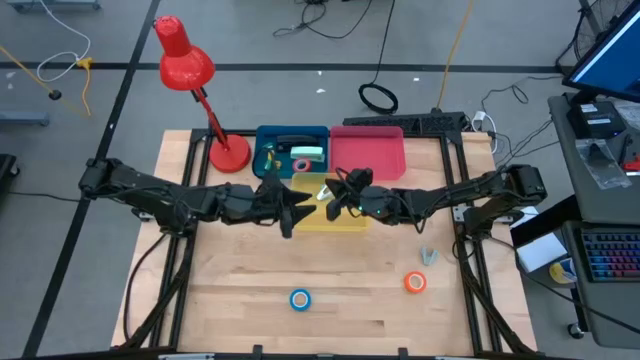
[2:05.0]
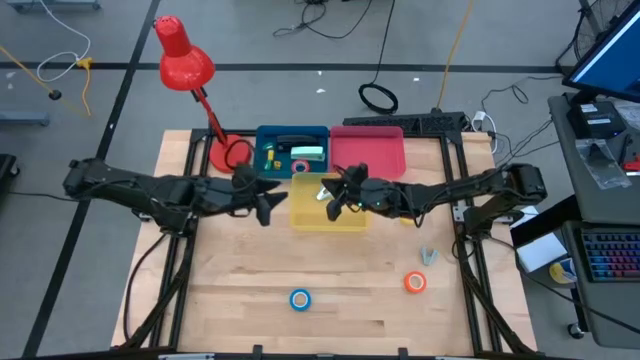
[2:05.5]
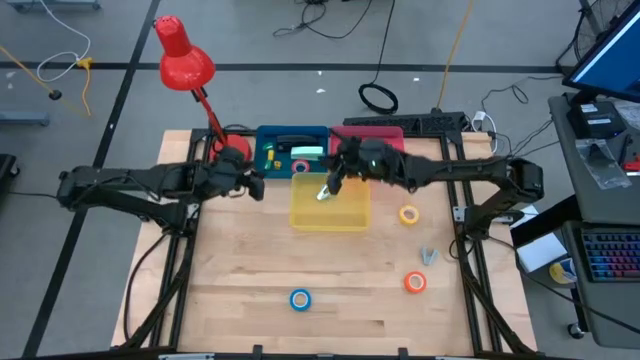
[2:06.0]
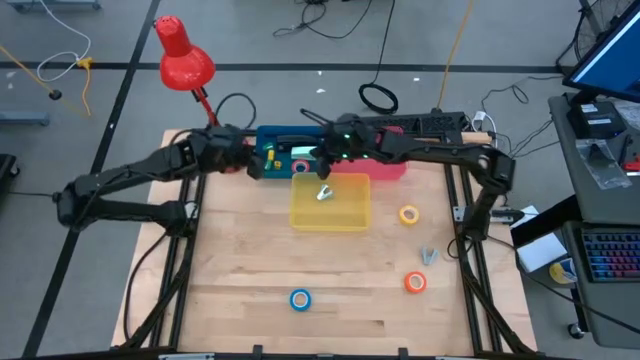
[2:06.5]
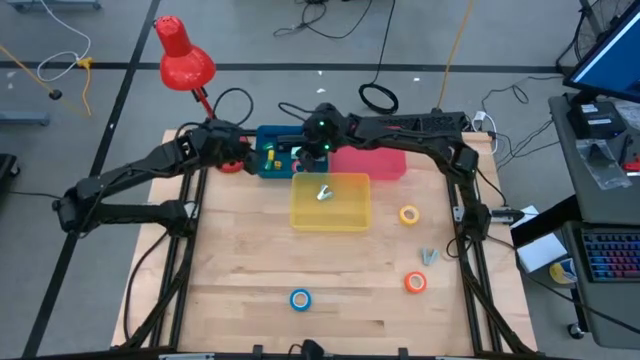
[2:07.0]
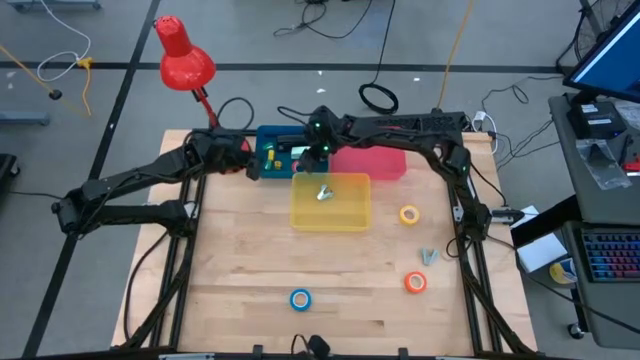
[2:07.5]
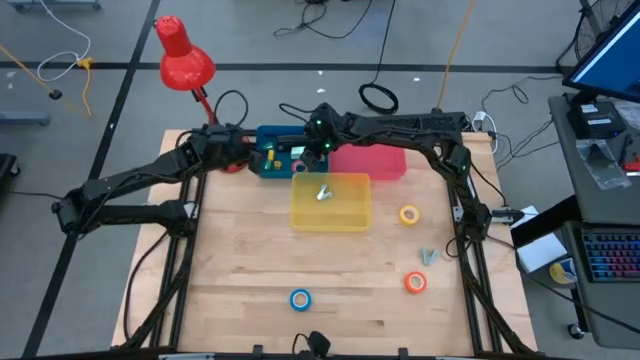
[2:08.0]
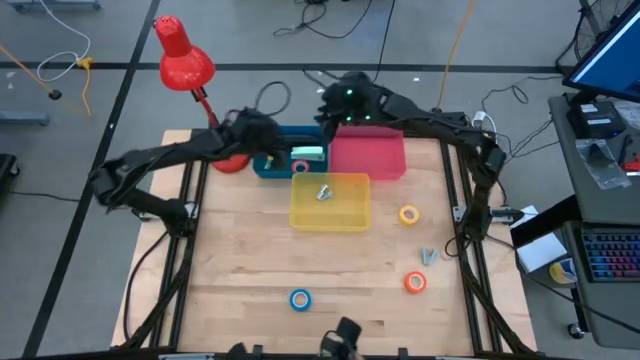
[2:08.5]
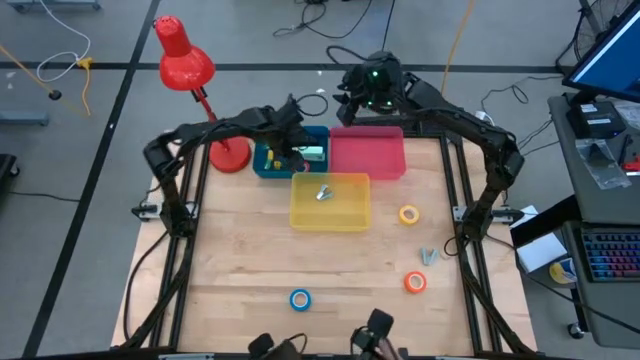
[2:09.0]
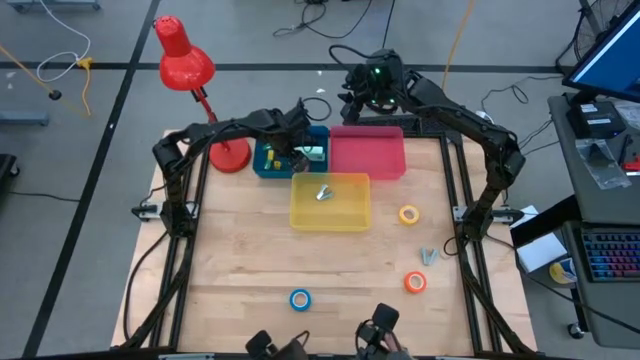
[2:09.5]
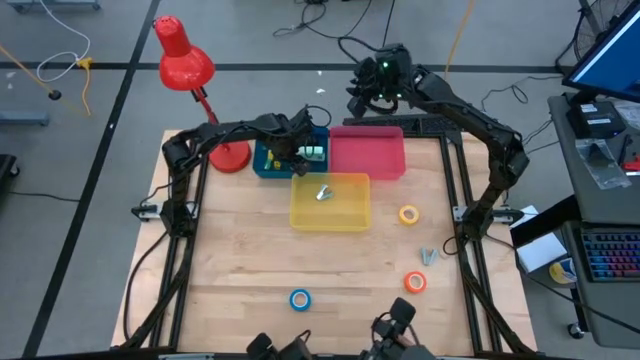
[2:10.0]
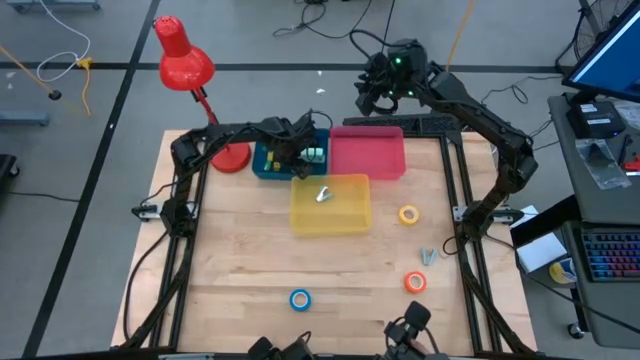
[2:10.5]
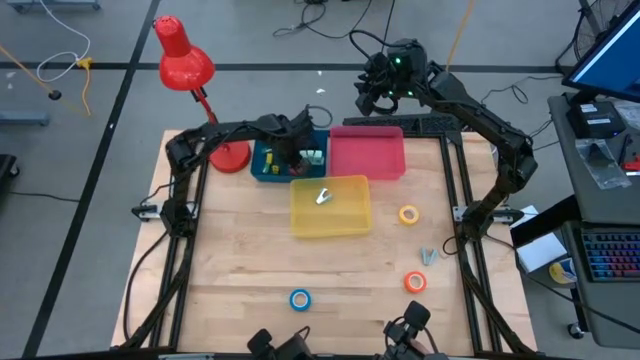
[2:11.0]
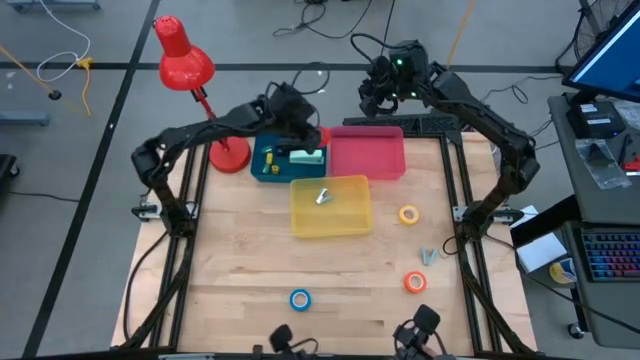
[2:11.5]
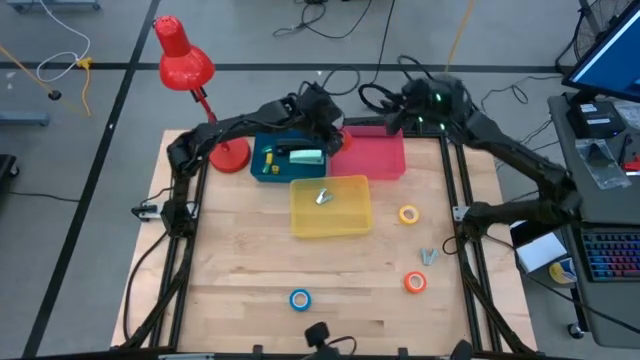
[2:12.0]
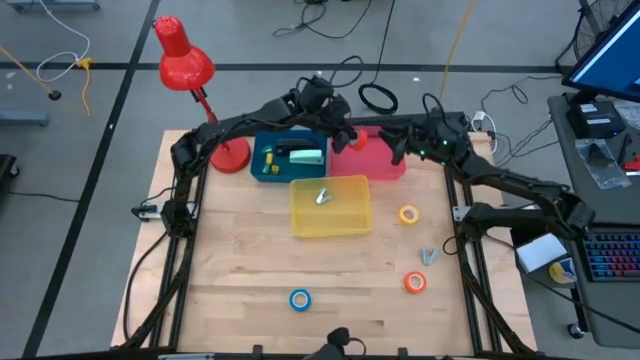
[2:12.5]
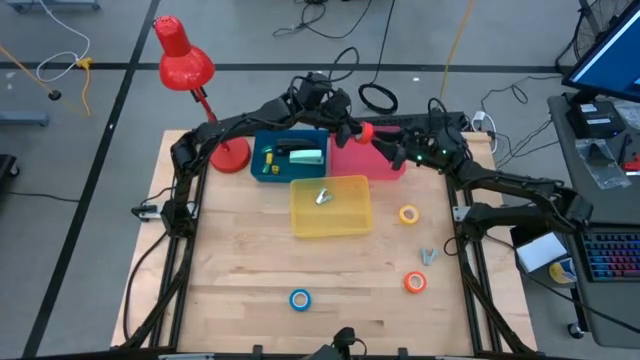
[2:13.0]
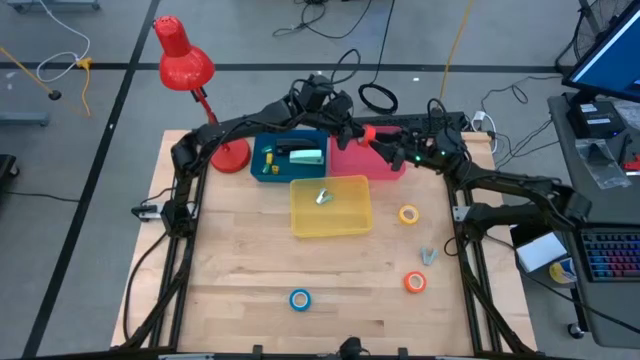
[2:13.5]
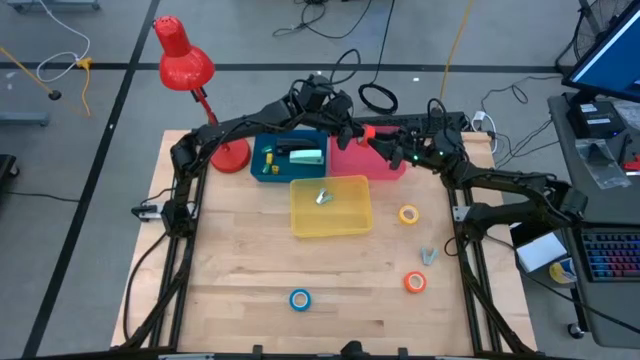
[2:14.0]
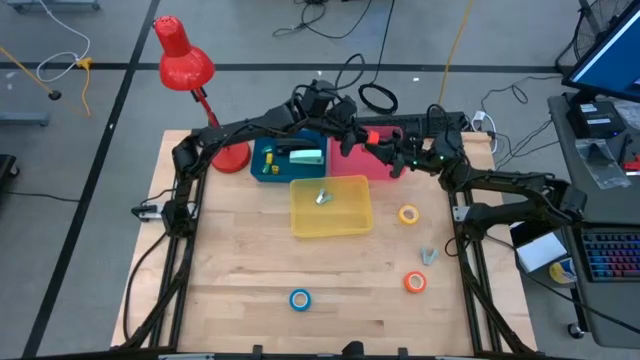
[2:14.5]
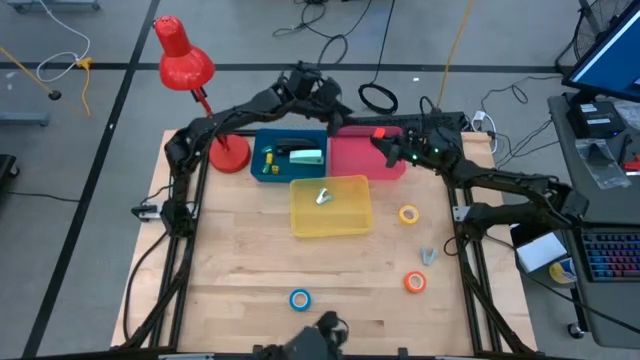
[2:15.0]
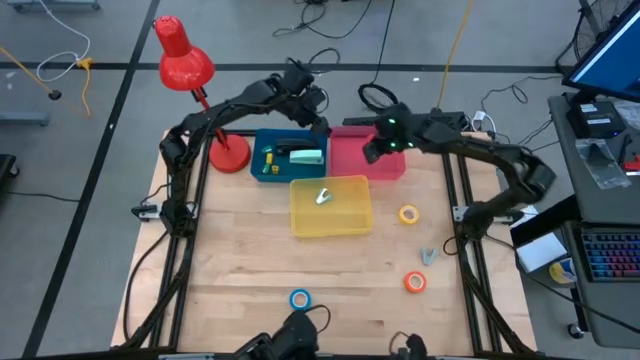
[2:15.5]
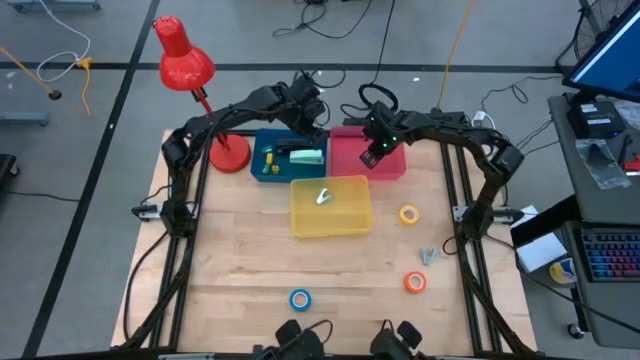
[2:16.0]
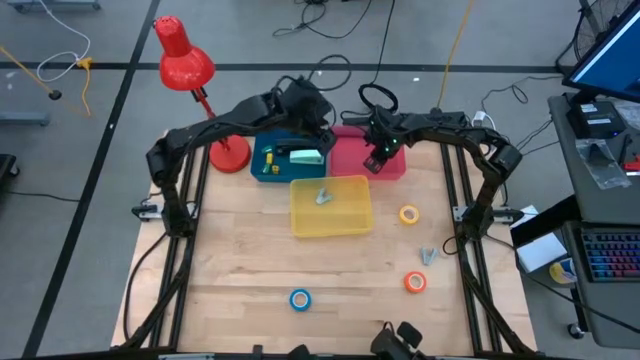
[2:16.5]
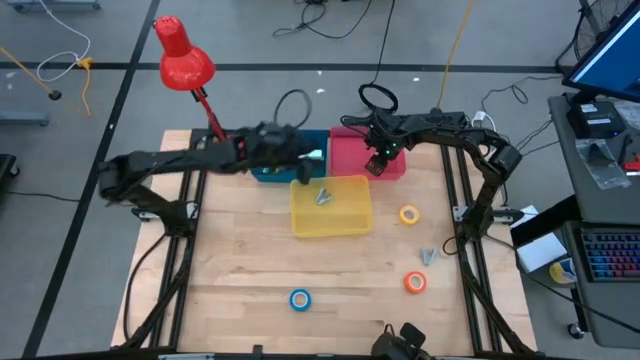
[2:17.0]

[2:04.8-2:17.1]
Task: Pick and place Stapler, Stapler remover, tape
Put the red tape into the pink bin

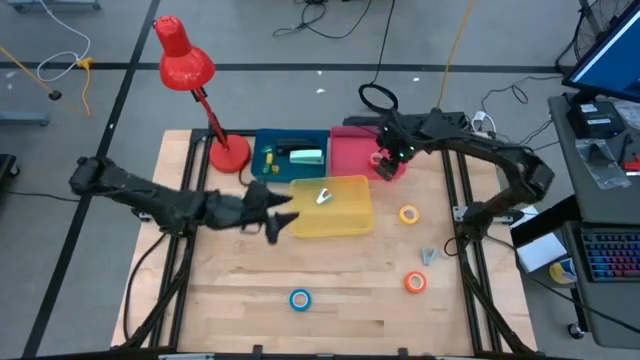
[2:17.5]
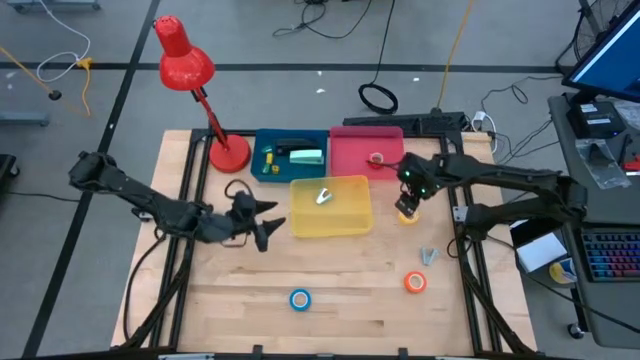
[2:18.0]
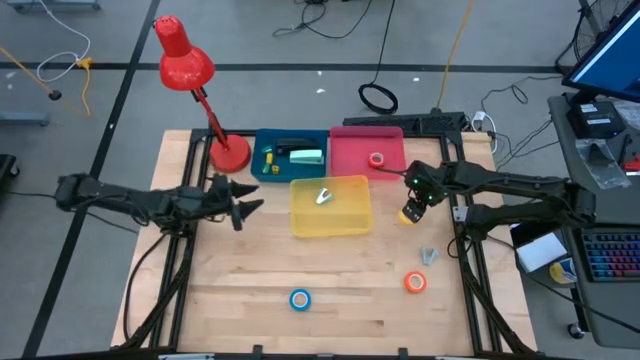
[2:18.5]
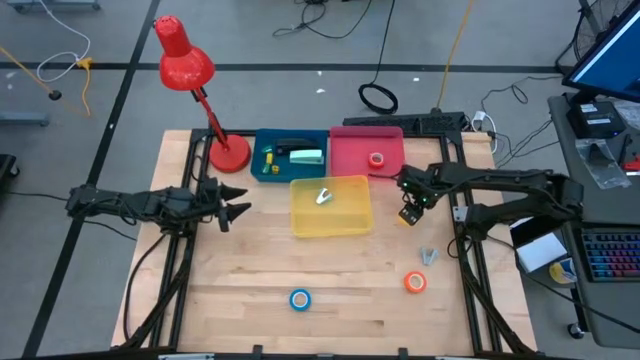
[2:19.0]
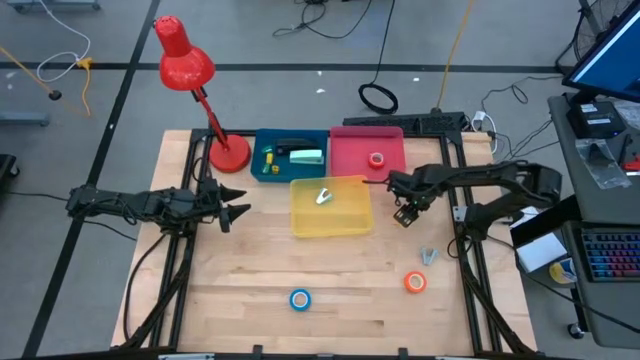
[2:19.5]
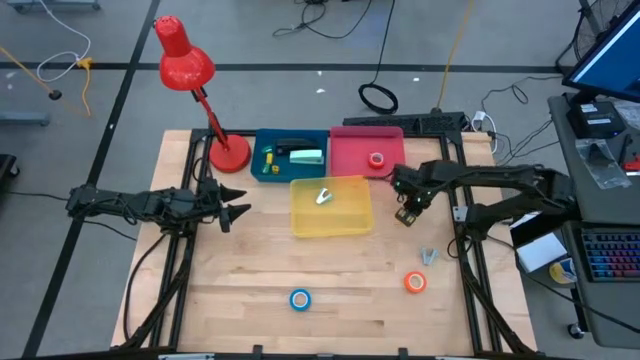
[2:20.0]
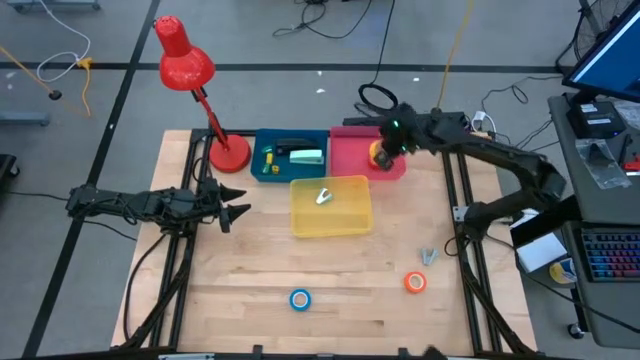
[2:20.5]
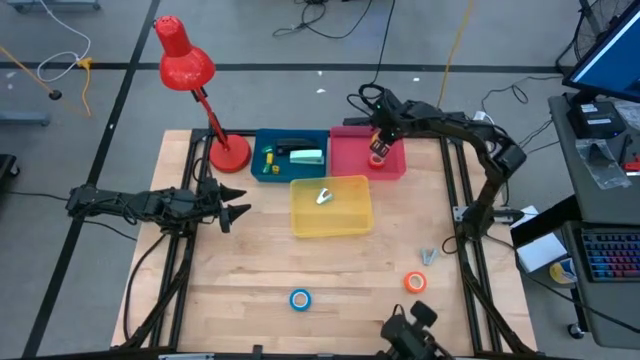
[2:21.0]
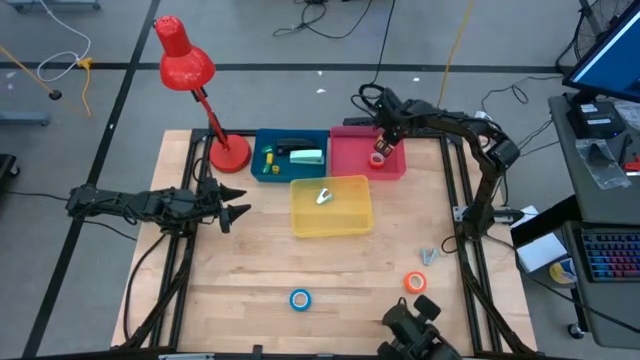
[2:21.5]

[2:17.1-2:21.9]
Put the yellow tape into the pink bin

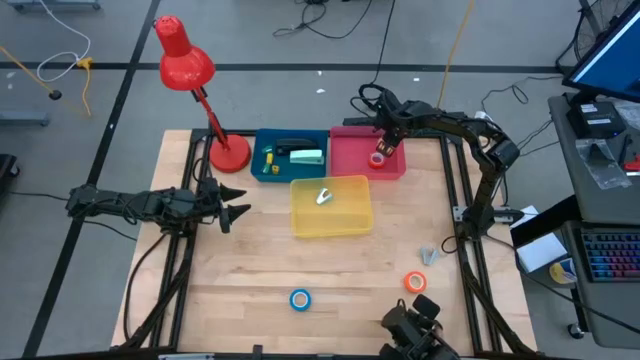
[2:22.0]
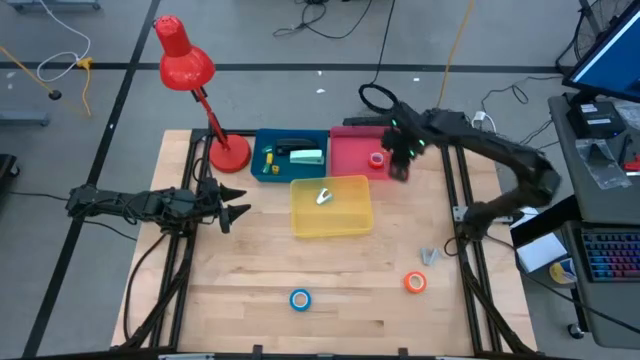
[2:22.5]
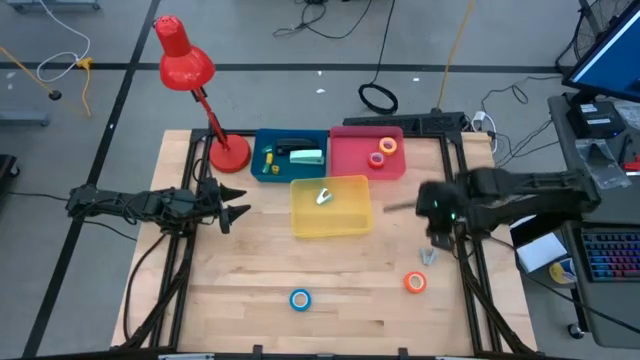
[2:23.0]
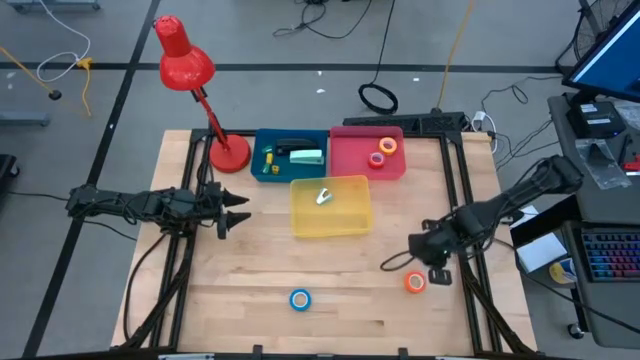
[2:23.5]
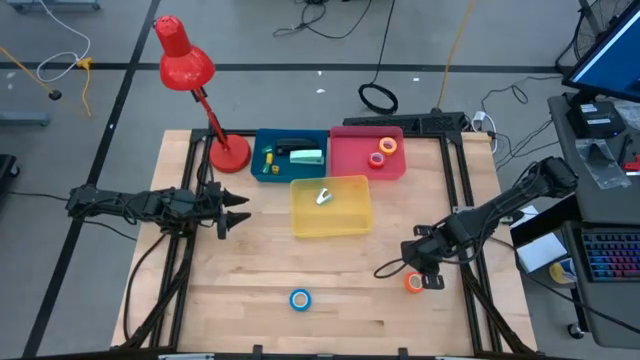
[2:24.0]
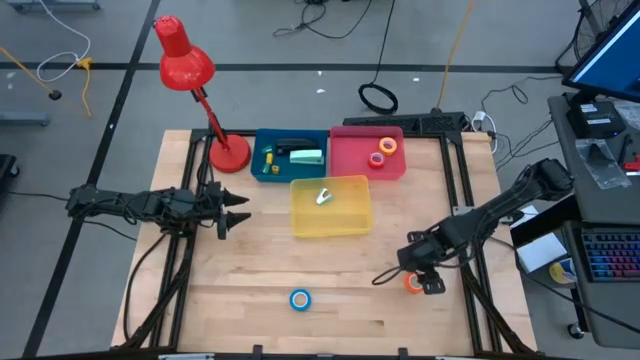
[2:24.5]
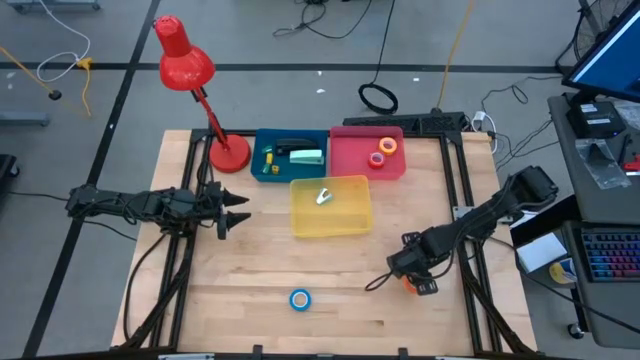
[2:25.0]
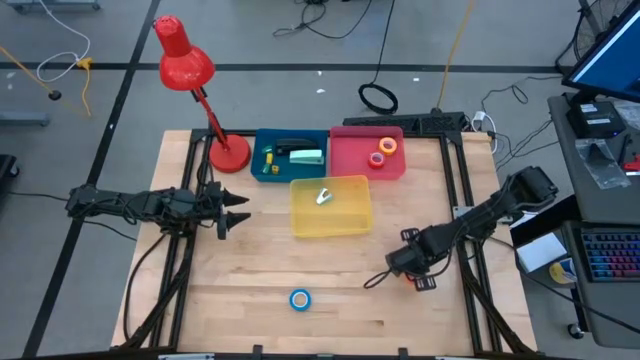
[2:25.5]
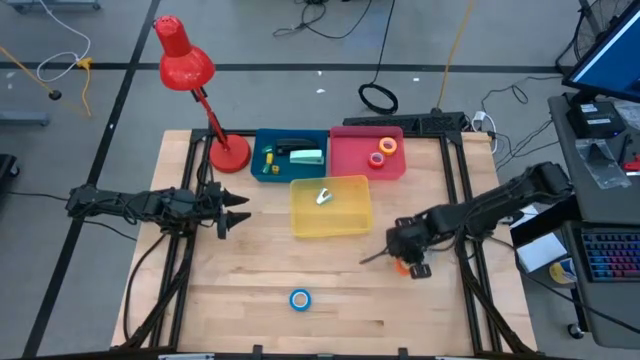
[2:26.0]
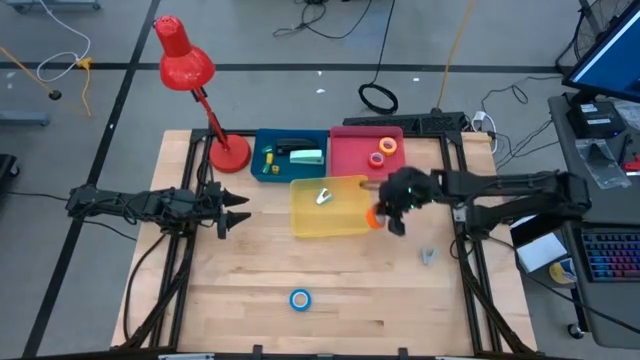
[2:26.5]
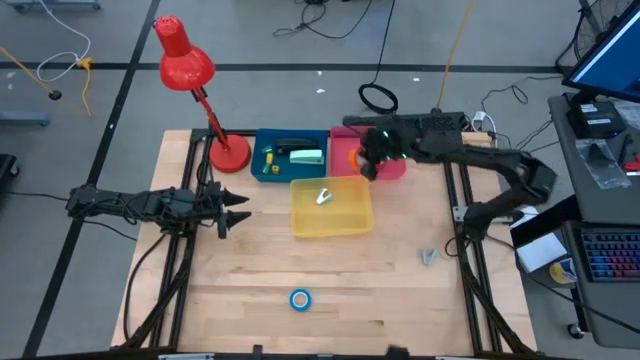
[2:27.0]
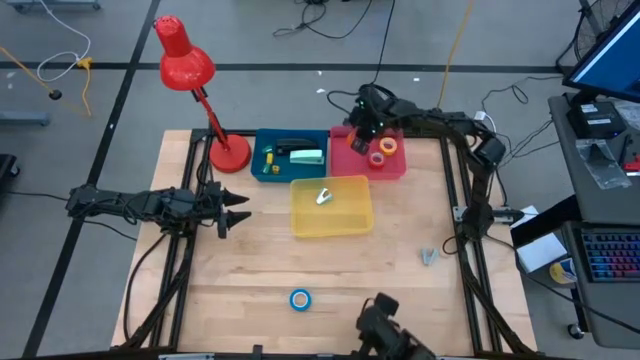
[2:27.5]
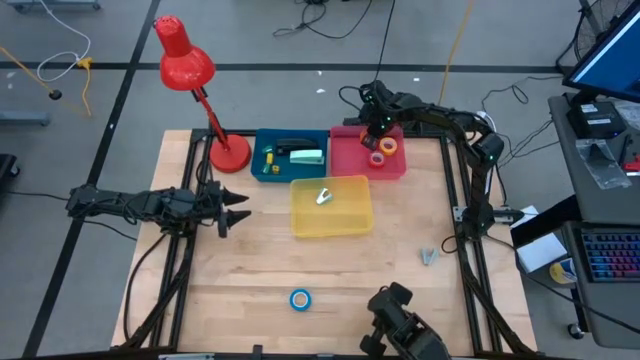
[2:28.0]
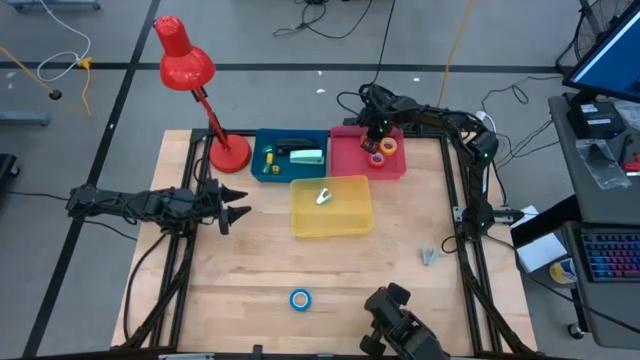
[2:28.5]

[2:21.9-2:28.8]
Put the orange tape into the pink bin
